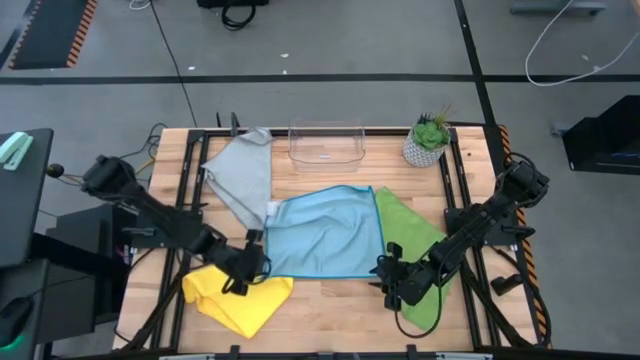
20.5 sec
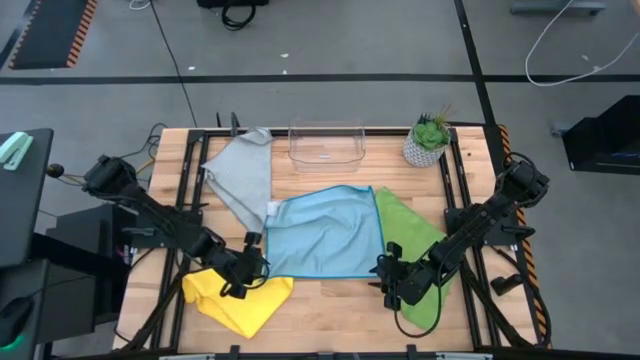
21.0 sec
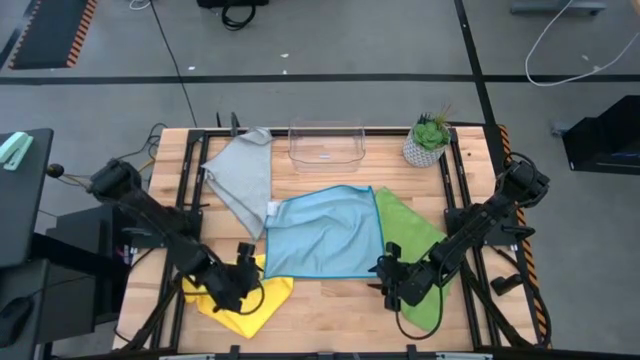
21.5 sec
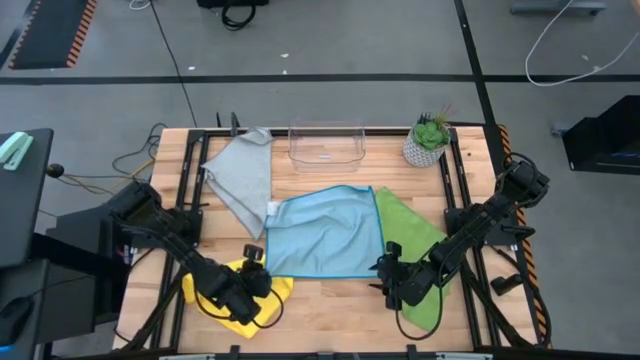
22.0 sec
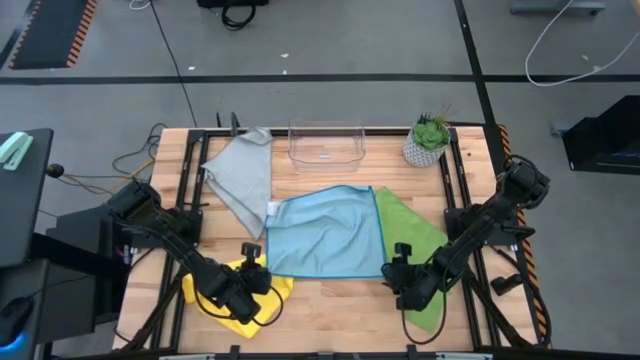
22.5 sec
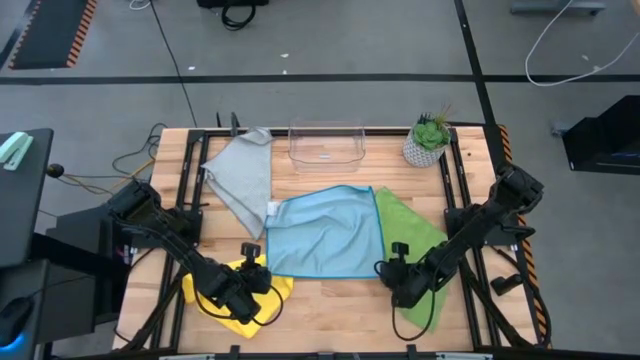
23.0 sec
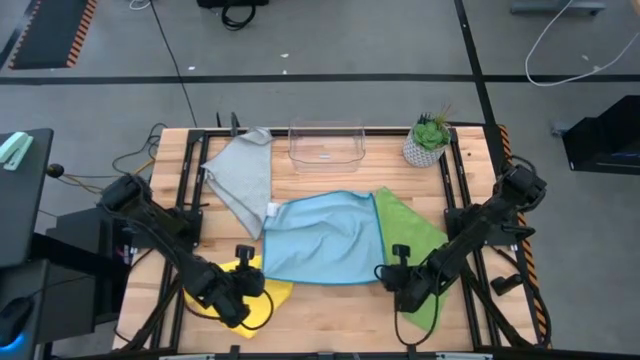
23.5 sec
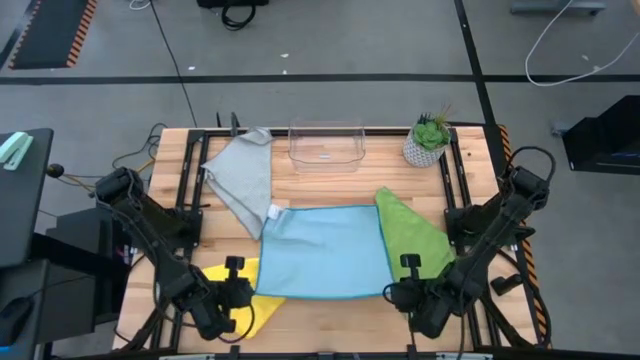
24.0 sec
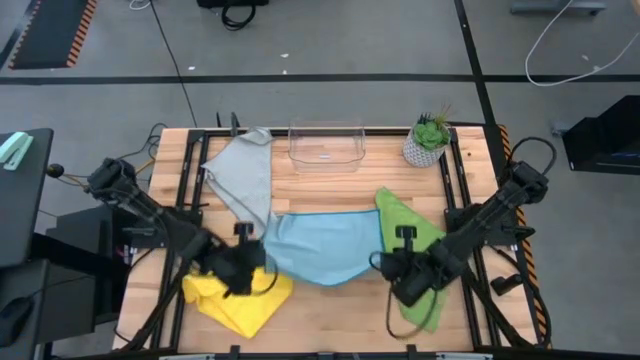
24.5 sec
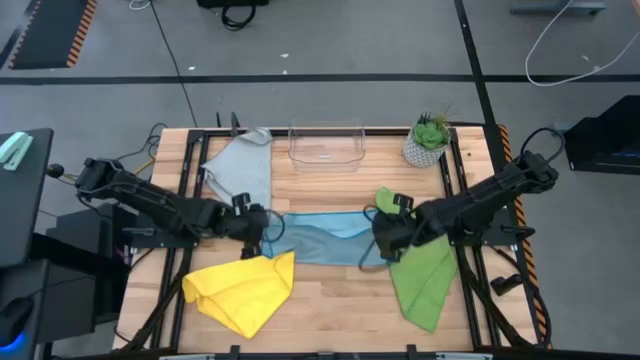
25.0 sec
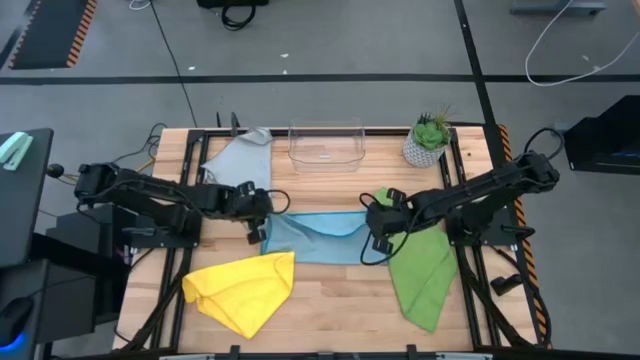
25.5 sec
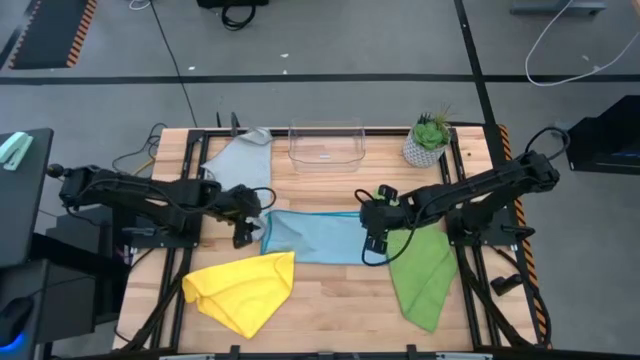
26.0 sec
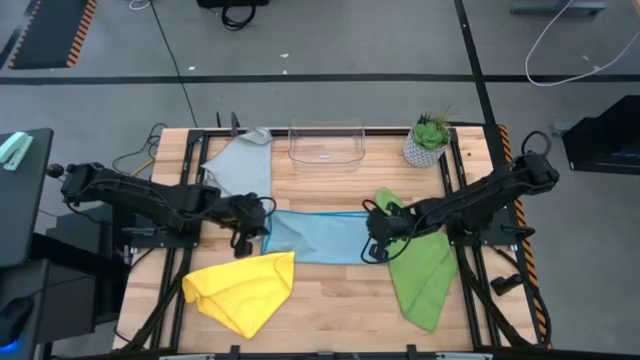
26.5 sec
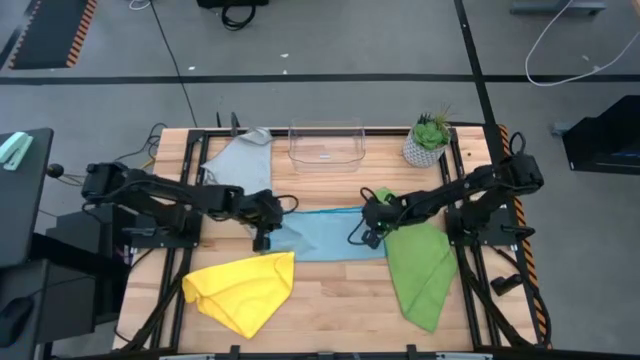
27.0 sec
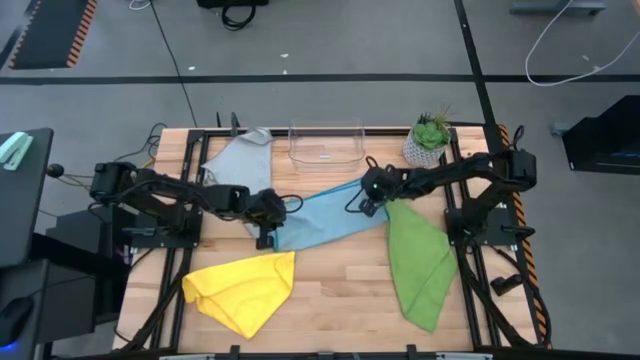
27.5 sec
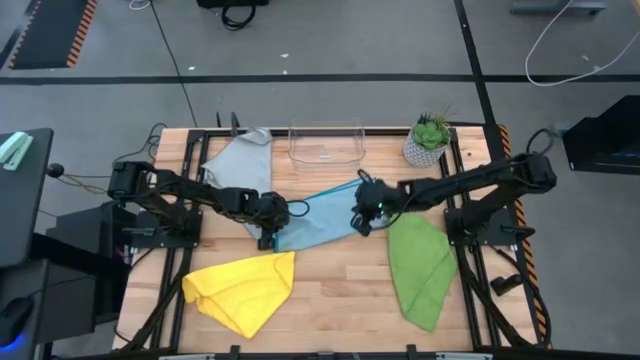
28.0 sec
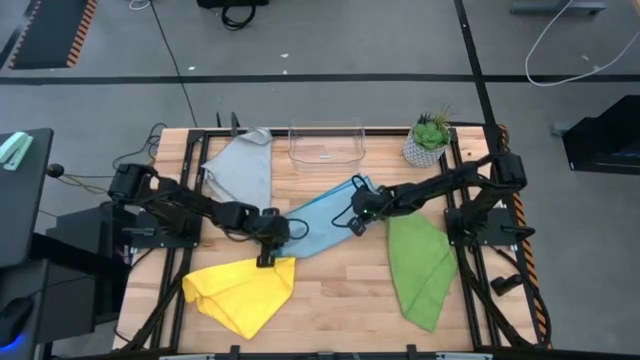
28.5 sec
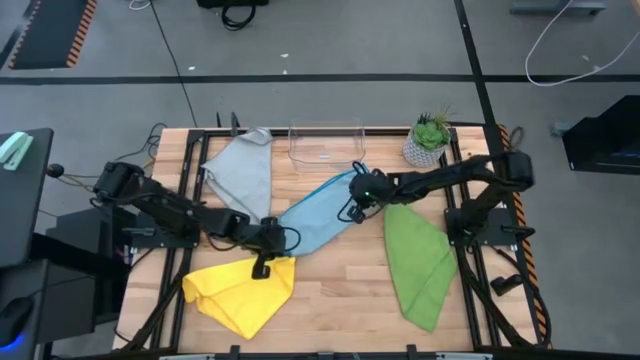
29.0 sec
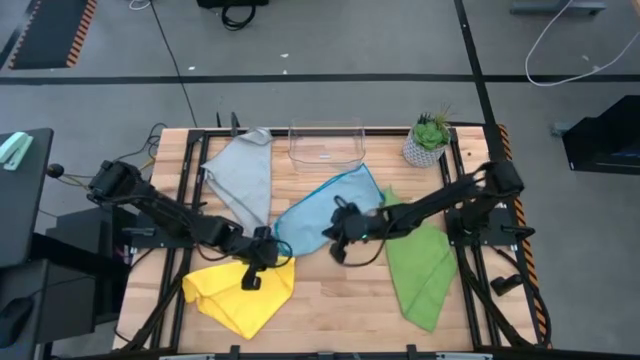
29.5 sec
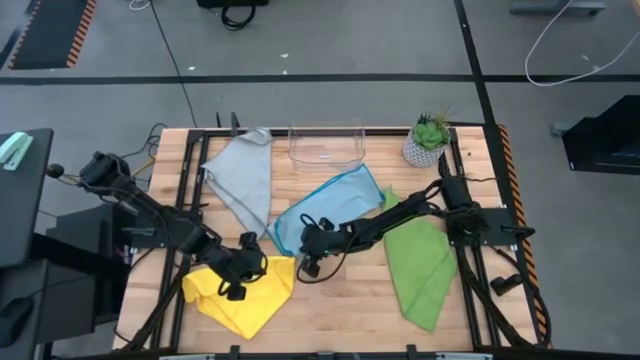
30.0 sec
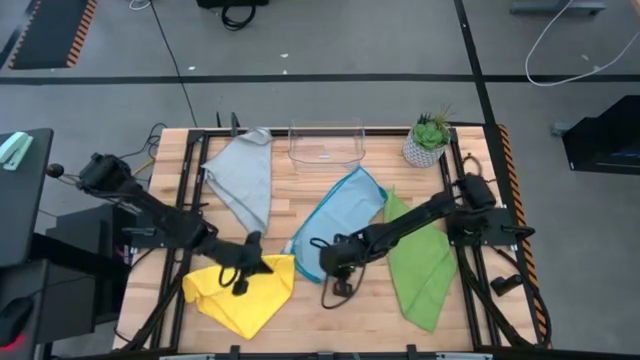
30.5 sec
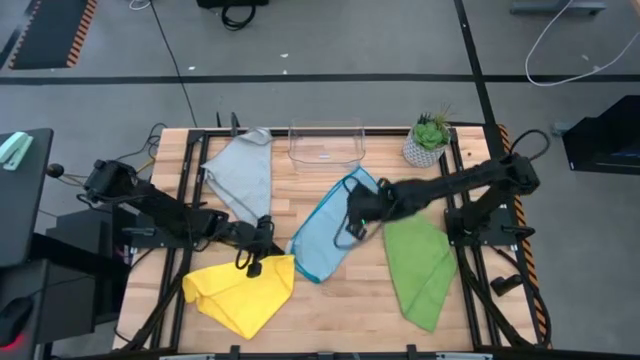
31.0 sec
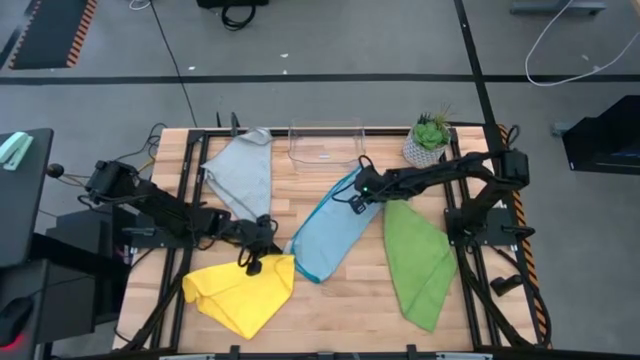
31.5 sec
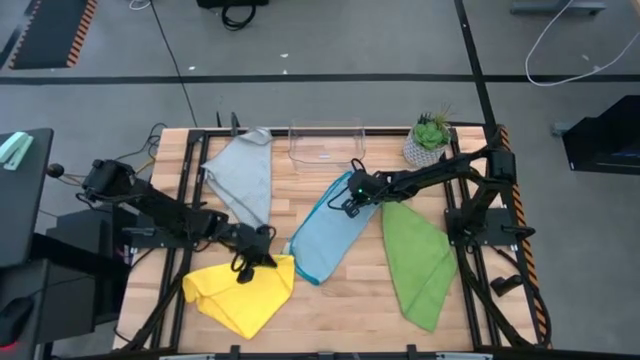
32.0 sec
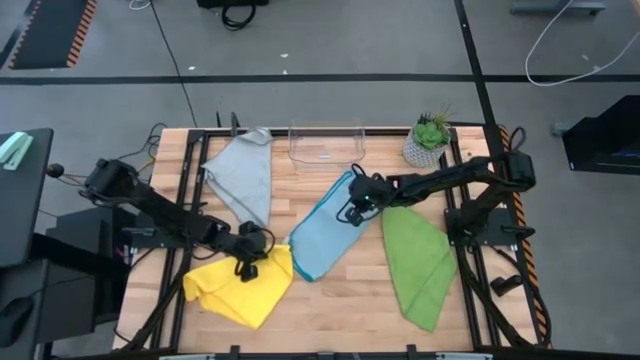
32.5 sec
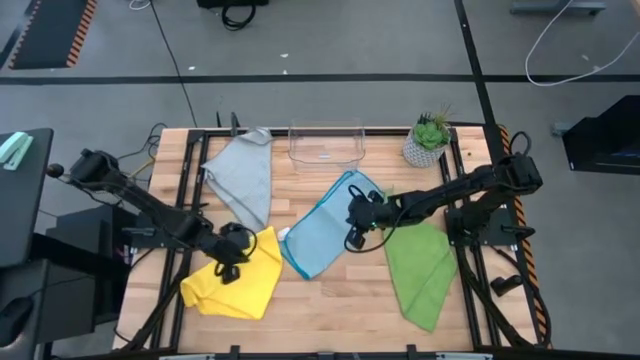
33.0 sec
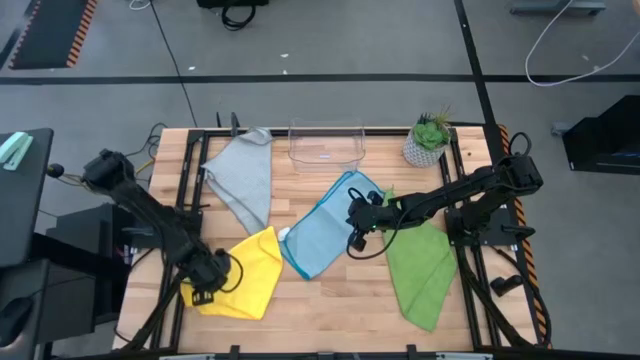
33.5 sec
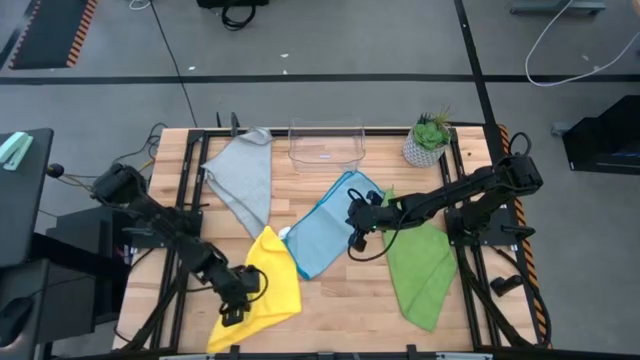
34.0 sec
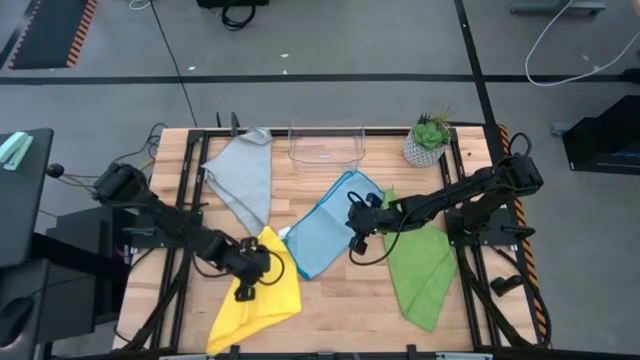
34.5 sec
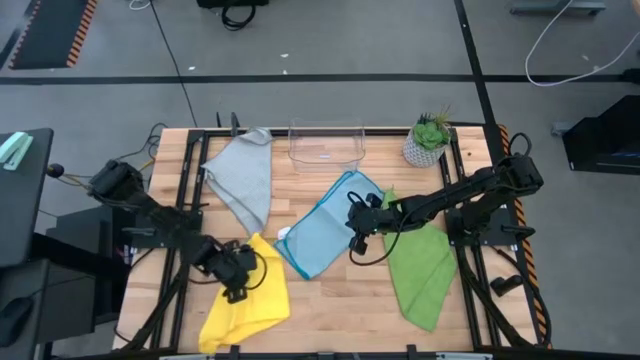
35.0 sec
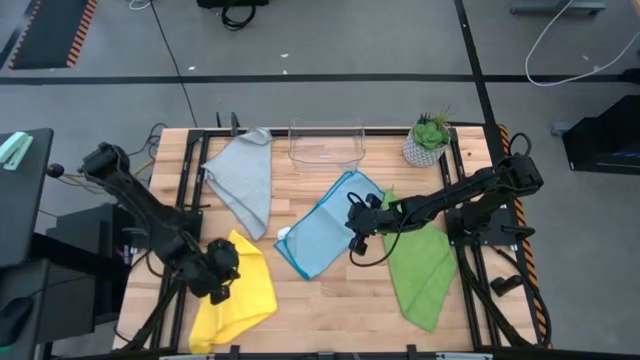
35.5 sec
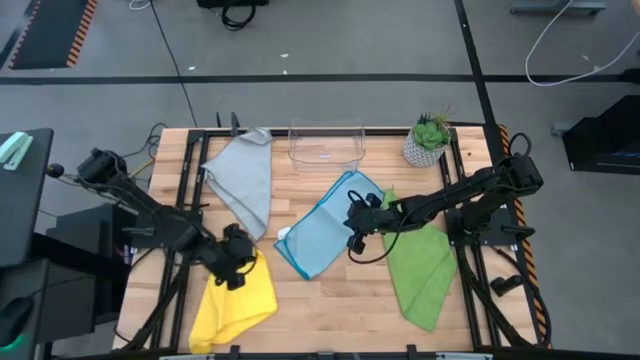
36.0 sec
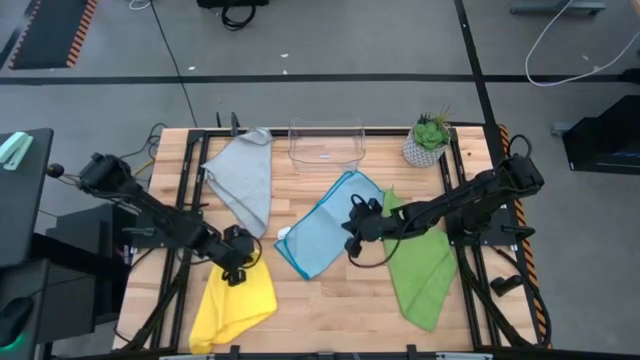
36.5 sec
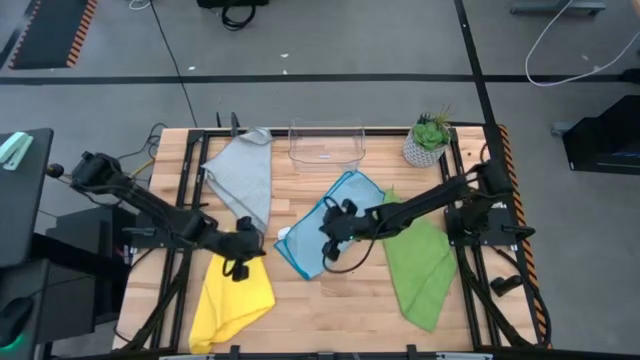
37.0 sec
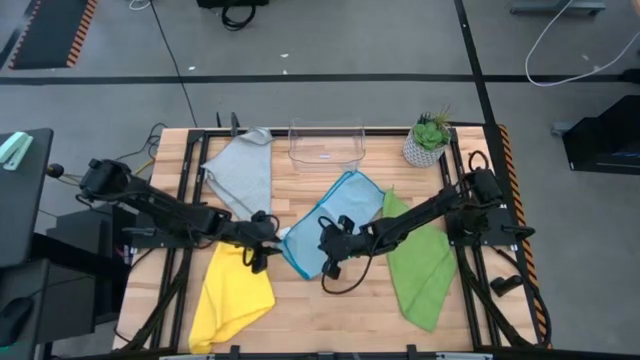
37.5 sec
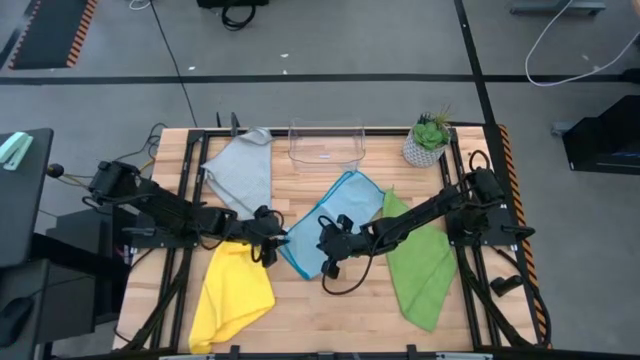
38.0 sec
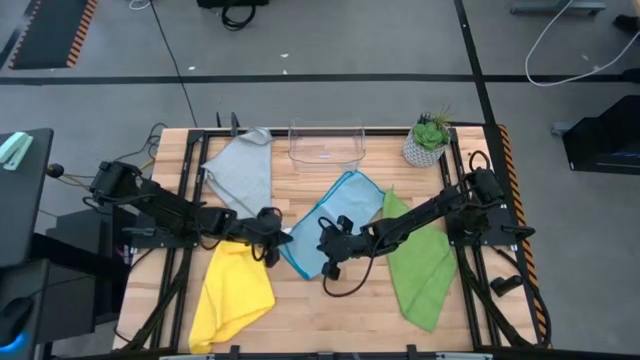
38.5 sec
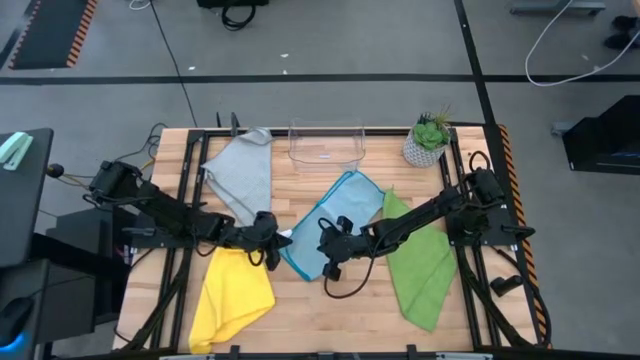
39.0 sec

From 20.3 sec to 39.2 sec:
Task: Fold microfiber towels
Fold the blue microfiber towel
